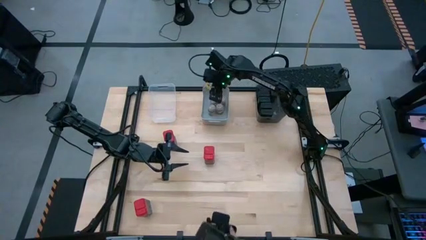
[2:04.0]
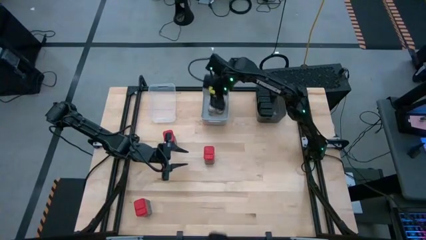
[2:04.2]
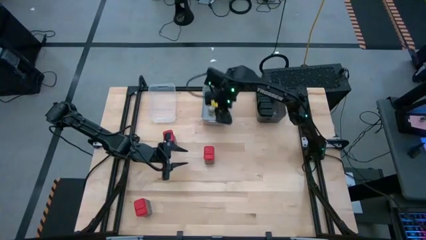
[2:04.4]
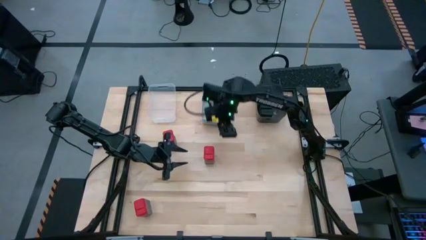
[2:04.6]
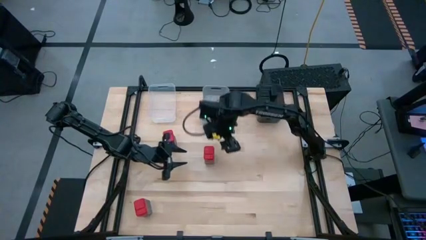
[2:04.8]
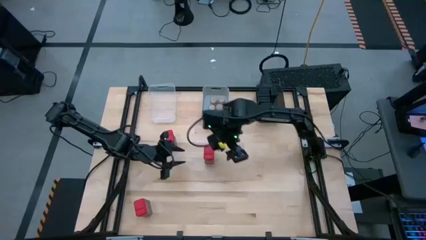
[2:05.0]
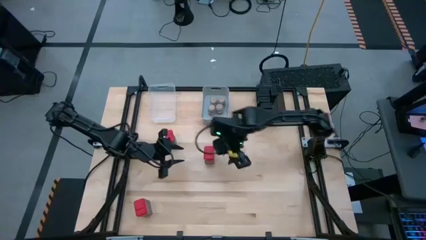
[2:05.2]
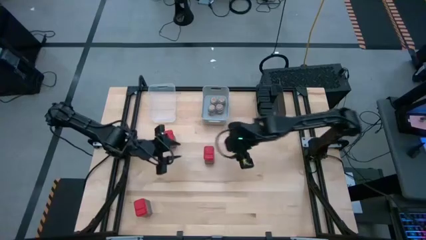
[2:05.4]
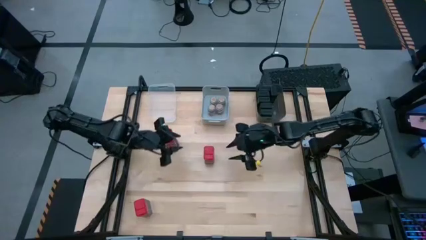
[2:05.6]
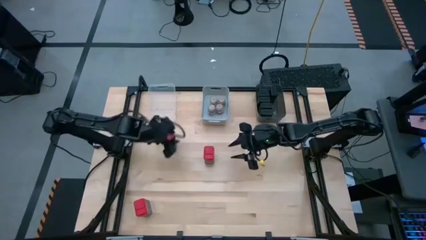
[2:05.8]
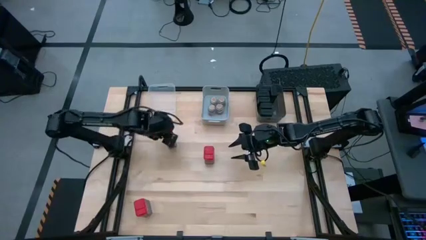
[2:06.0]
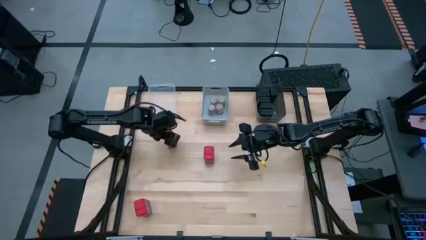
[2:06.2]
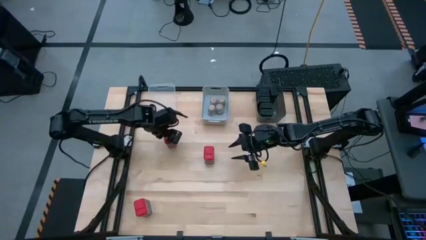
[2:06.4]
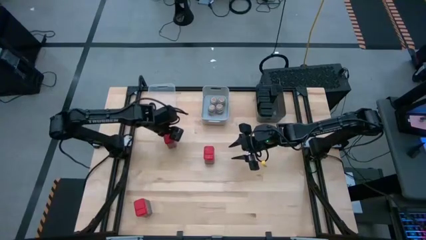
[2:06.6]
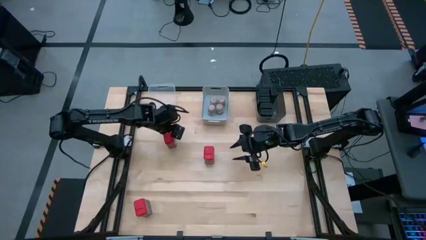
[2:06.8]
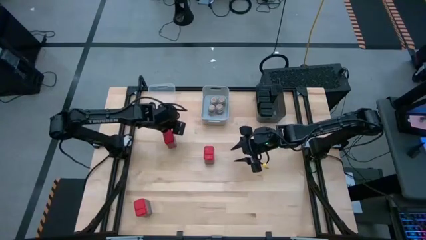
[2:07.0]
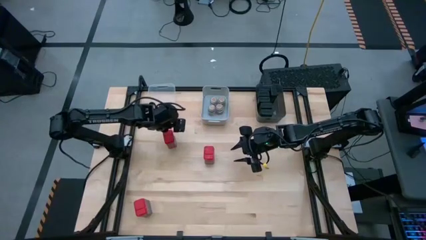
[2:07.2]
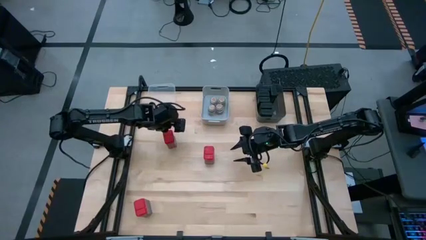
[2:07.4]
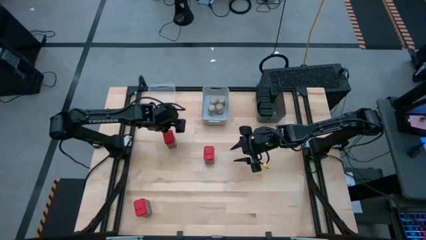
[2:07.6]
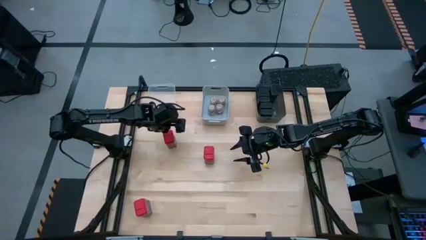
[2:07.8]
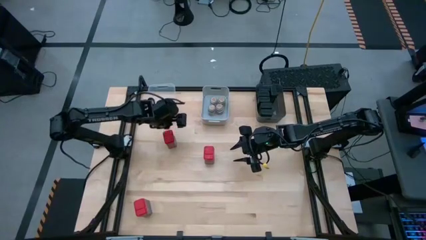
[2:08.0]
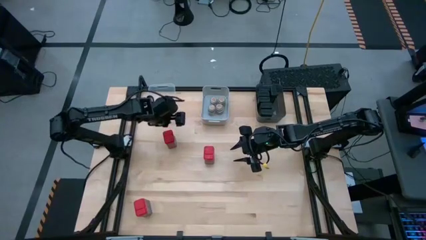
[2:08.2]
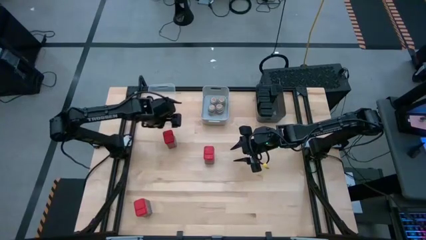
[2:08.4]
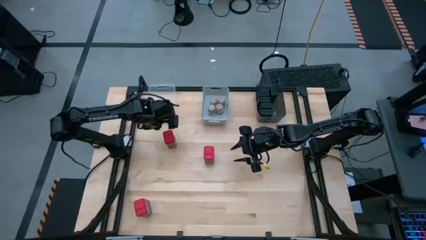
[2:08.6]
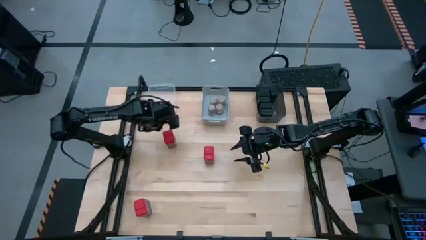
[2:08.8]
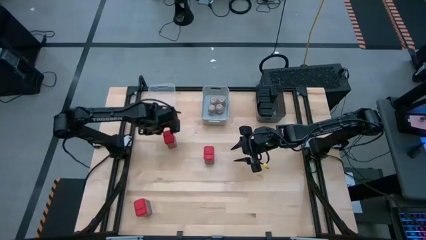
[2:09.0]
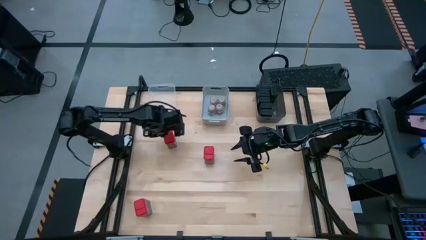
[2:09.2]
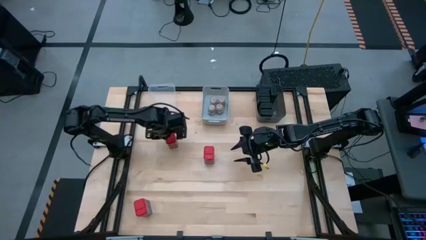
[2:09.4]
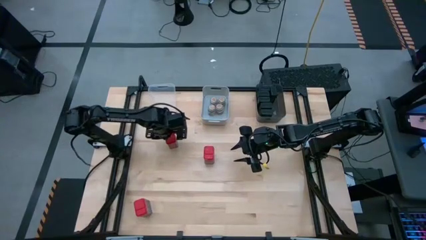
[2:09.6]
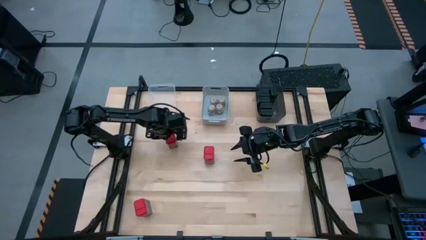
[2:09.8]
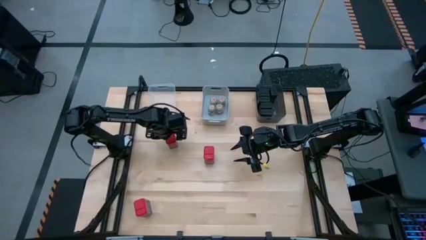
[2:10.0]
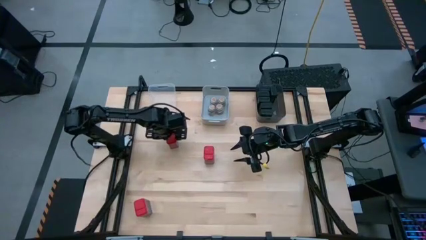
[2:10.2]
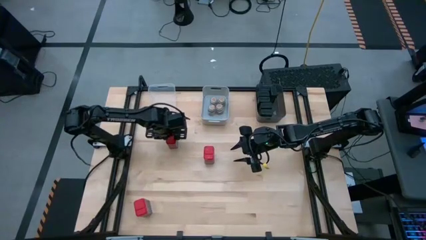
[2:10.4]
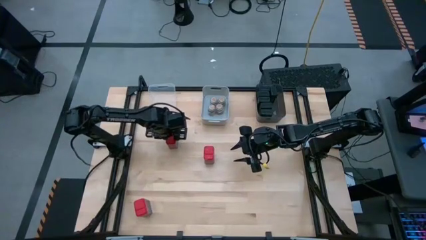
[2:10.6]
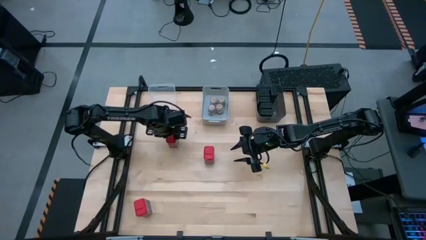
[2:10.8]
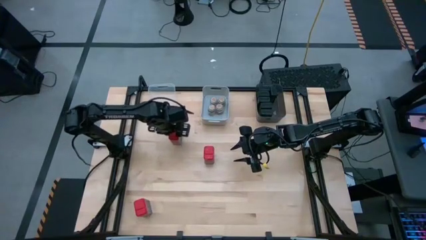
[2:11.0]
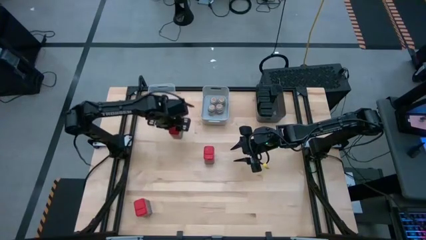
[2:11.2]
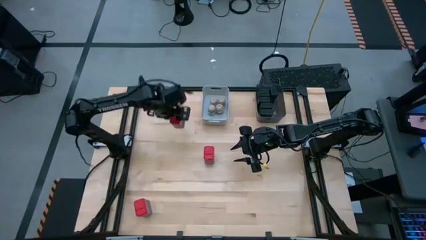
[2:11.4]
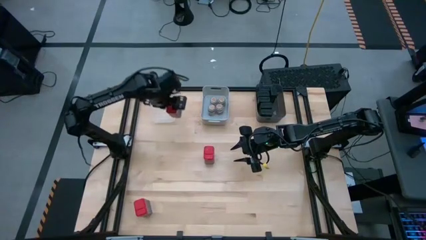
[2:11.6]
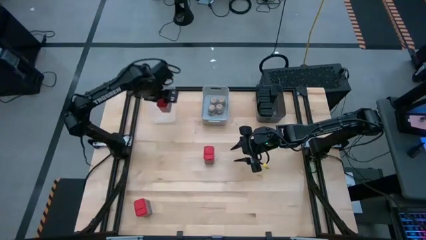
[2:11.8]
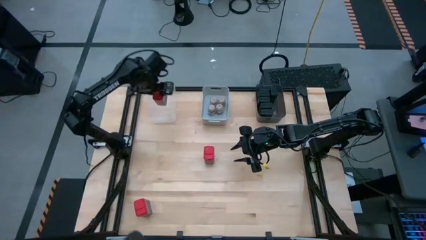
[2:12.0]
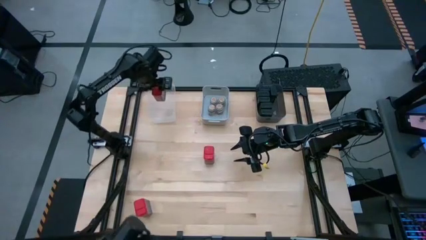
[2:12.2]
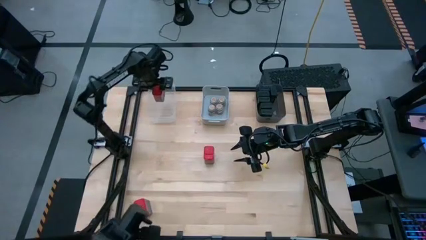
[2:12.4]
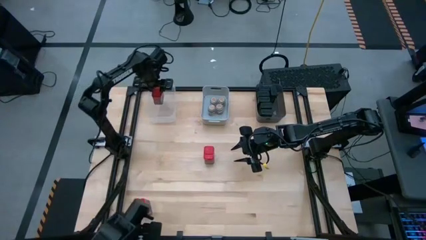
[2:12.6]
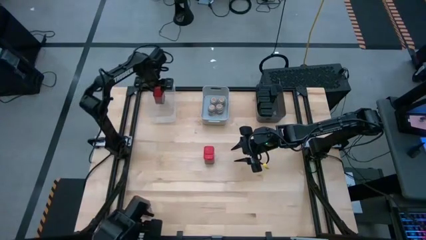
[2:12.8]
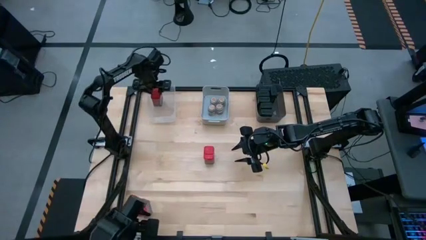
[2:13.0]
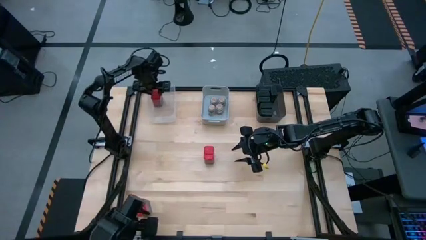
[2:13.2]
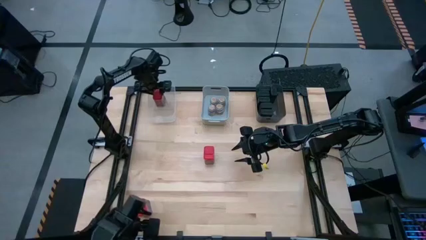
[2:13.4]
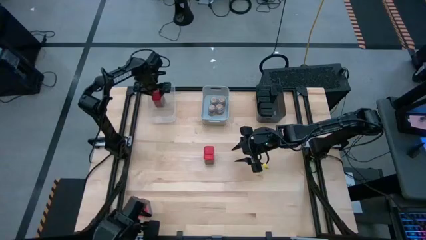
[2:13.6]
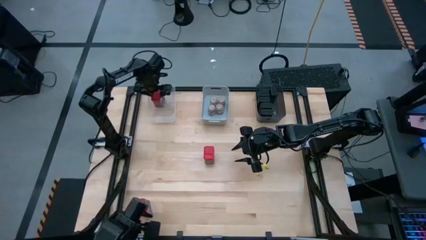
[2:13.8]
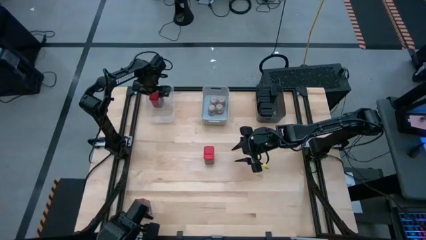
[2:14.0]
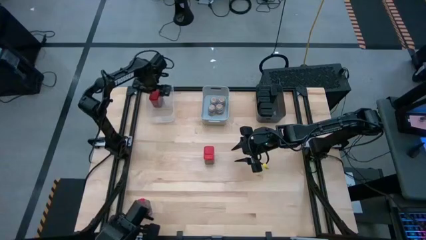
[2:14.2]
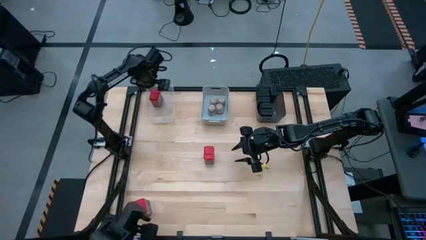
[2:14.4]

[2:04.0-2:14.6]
Task: Sort spices by type
Put the top left red seasoning can into the transparent bin

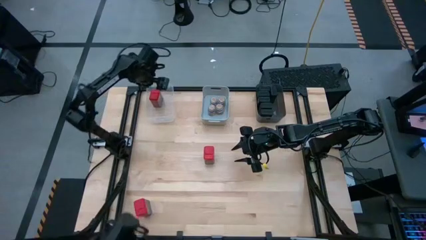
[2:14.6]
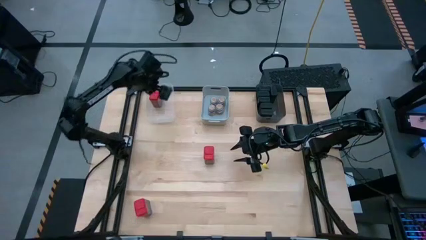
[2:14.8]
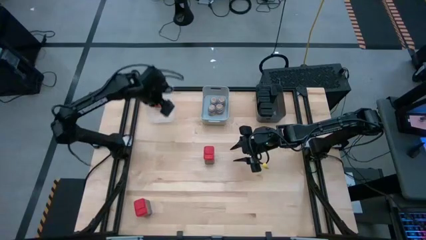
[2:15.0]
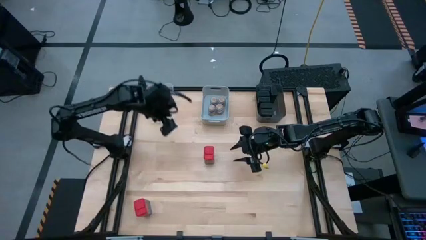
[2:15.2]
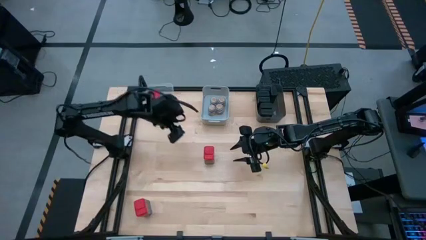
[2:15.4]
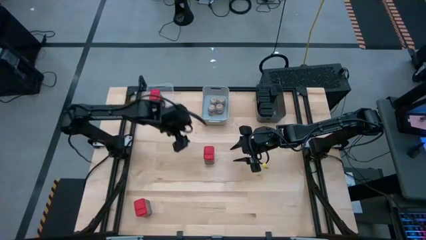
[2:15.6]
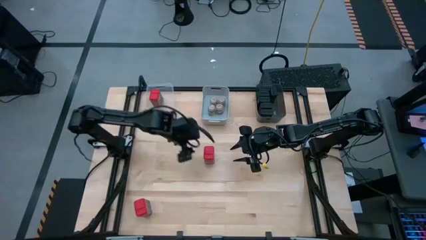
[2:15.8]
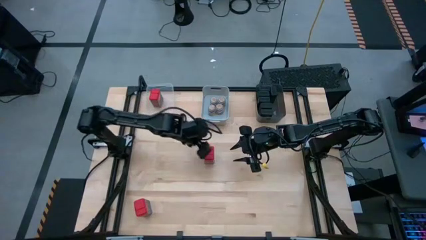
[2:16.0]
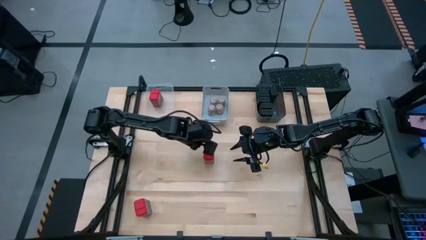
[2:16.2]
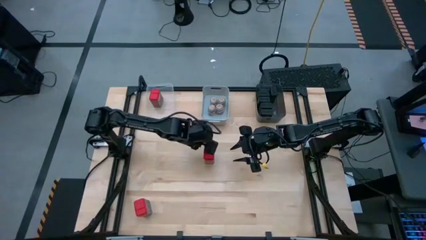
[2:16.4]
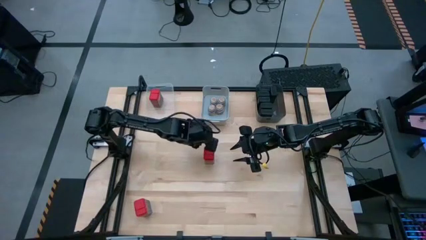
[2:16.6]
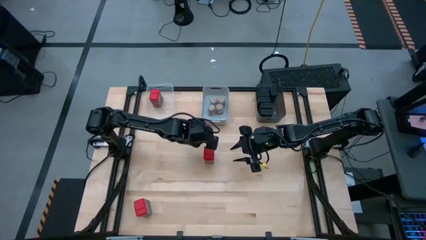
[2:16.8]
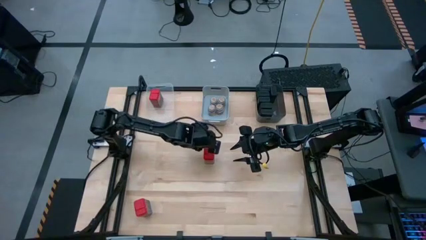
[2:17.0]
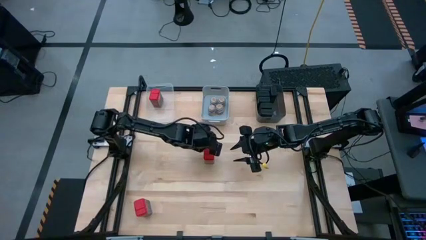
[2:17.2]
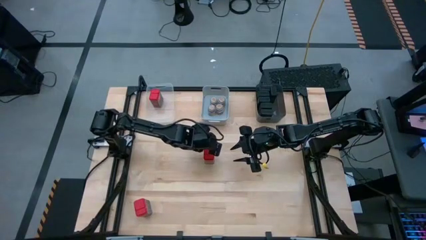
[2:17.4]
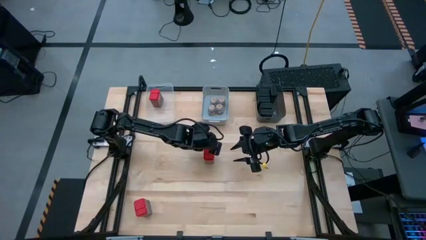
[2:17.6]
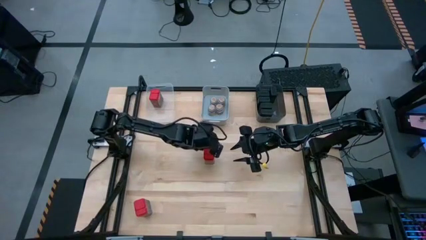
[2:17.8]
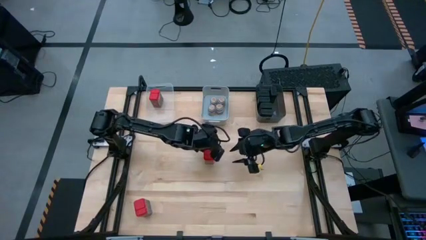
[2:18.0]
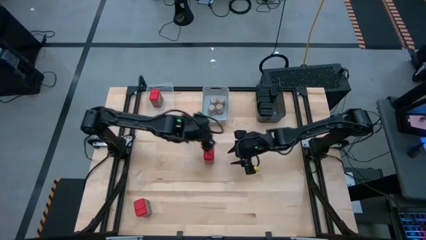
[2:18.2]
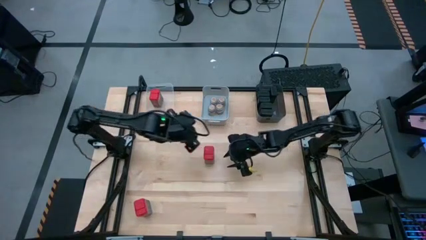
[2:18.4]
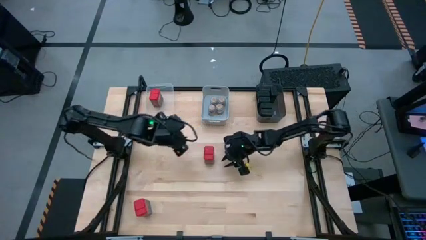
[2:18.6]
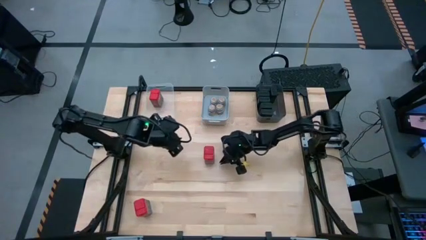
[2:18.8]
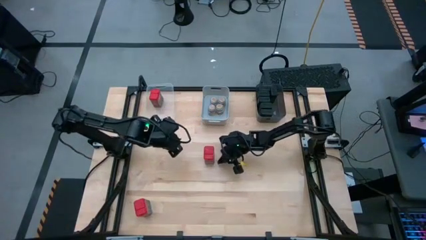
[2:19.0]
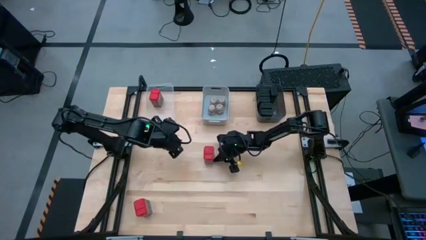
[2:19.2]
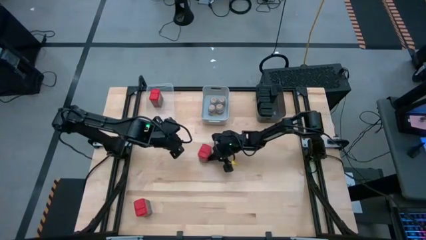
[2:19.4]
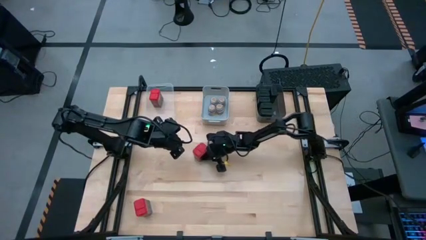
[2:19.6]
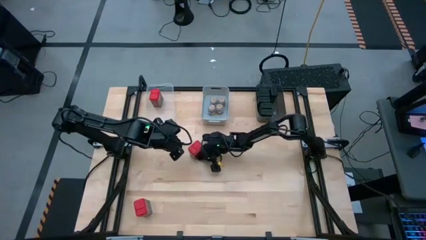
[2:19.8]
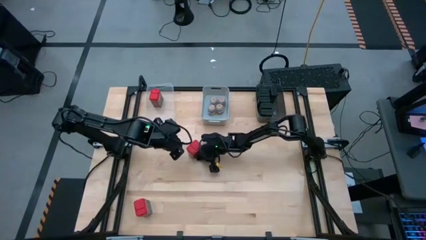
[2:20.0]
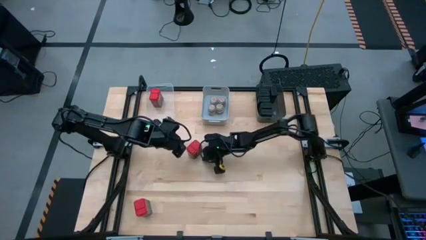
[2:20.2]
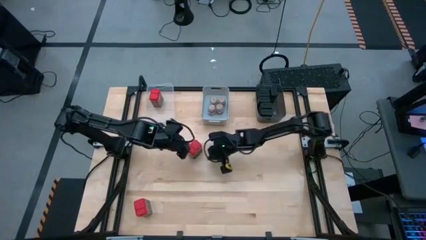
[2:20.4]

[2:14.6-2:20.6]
Adjust the right red seasoning can
